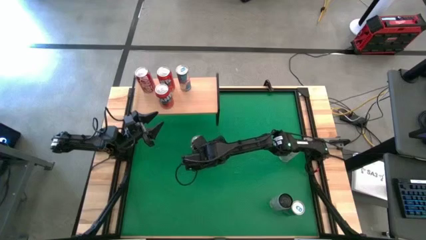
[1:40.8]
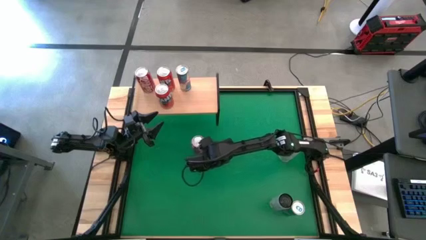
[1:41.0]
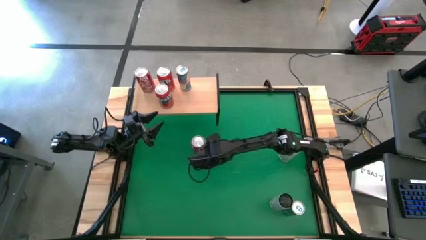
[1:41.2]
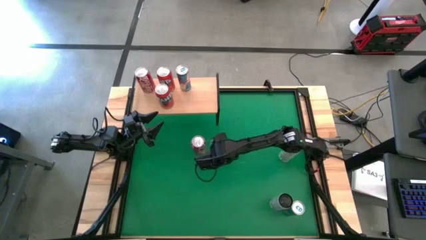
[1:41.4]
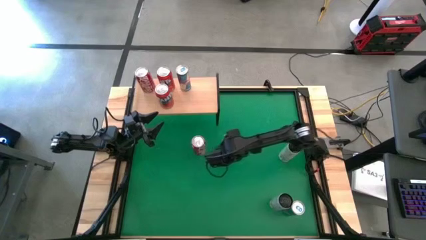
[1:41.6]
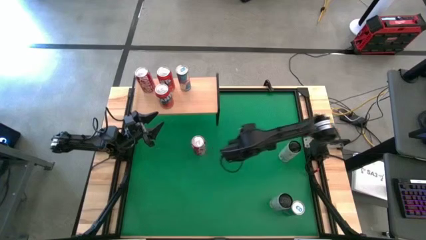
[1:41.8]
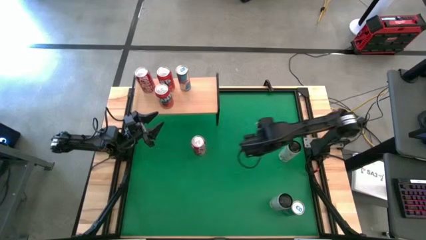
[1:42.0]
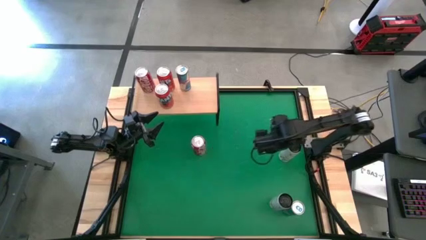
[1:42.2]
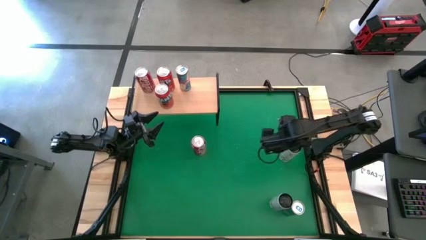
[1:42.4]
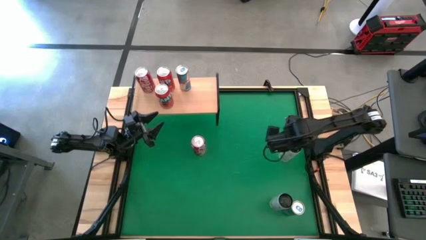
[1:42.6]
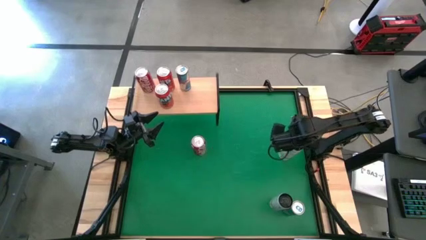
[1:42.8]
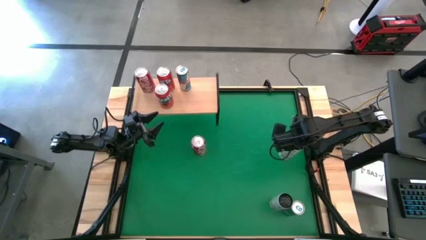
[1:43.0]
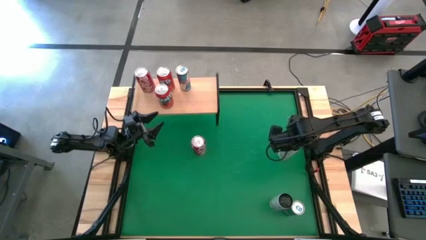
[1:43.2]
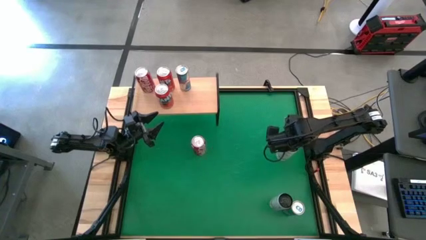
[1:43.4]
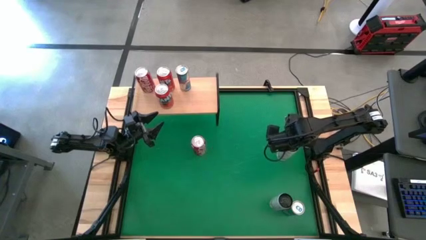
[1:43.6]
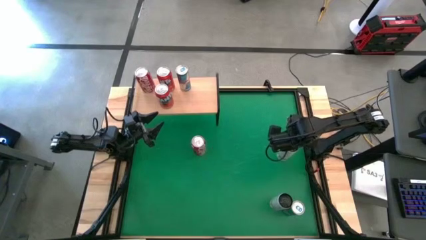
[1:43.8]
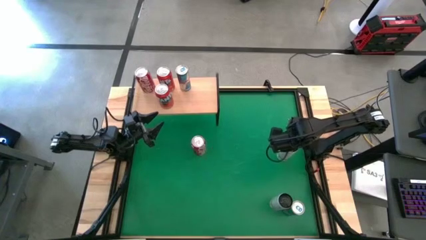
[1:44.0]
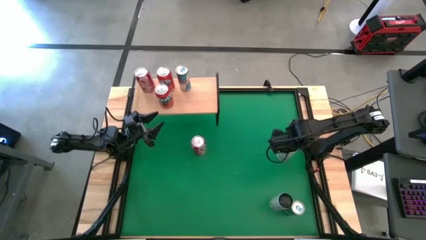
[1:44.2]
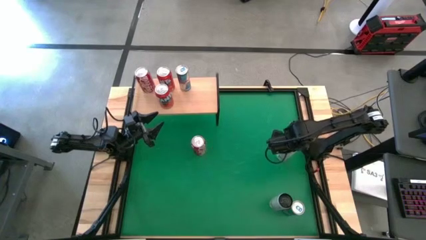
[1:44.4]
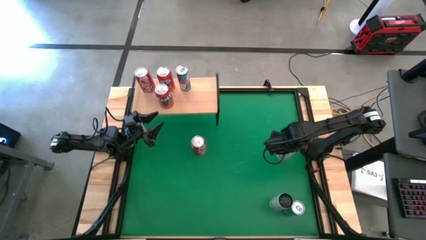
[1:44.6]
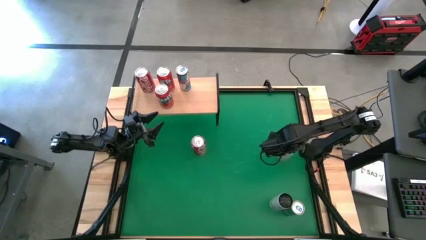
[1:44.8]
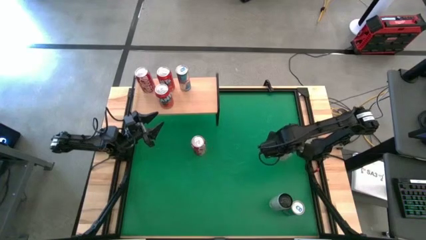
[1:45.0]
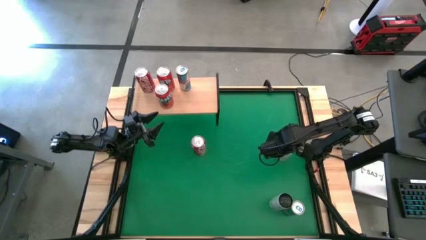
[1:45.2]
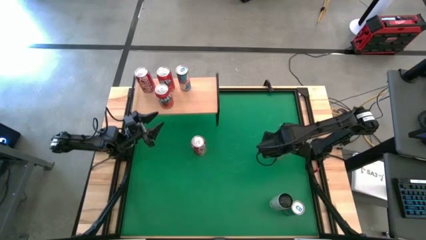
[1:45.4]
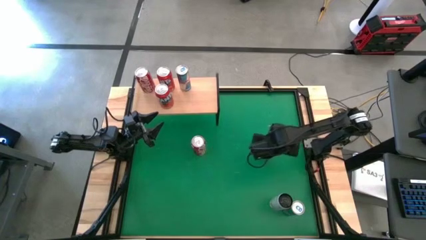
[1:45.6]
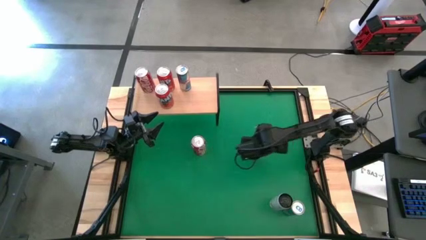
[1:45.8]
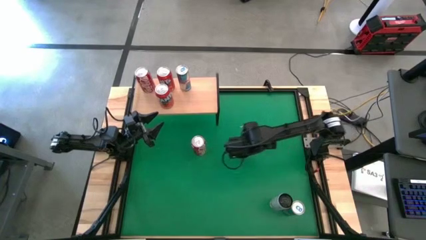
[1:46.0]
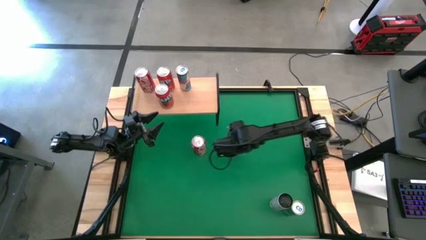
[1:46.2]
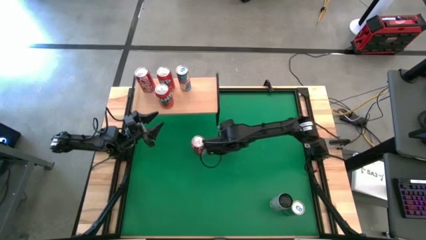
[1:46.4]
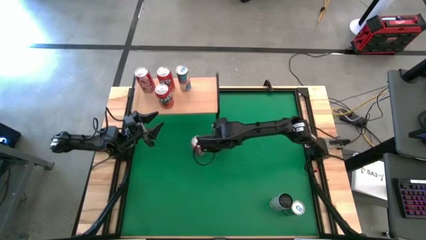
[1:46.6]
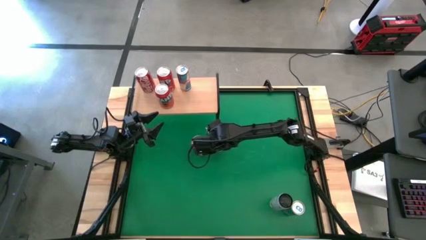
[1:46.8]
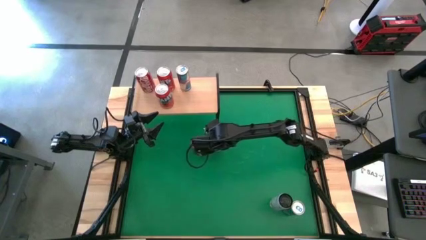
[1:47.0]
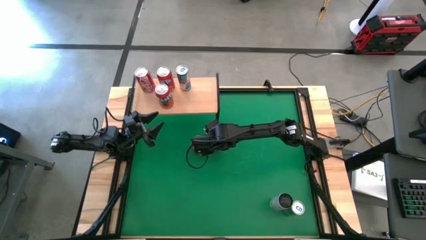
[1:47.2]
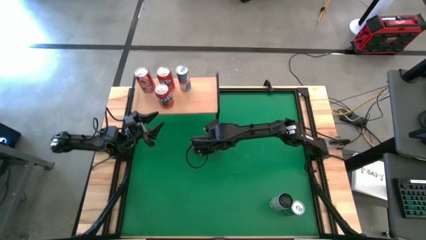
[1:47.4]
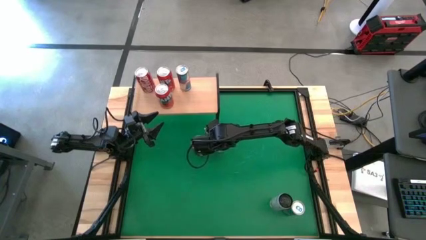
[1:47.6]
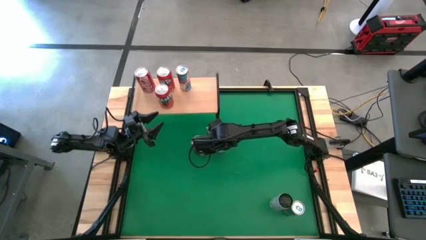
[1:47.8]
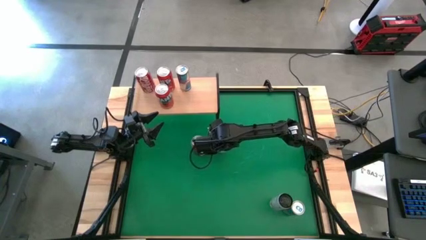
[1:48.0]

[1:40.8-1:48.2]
Task: Place canned beverage on shelf
Move the top white soda can to the center of the table

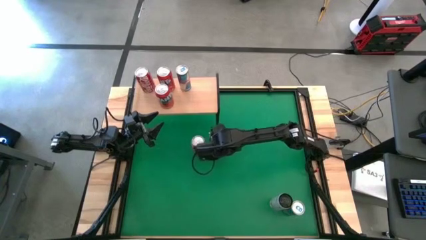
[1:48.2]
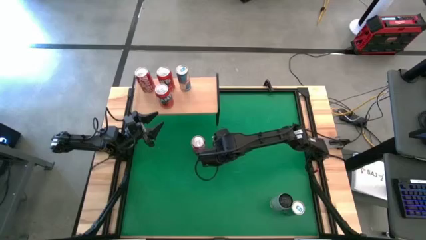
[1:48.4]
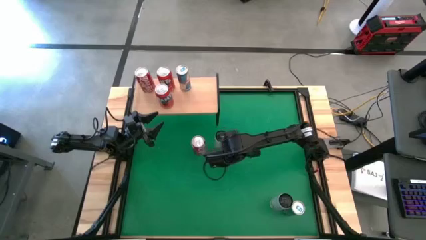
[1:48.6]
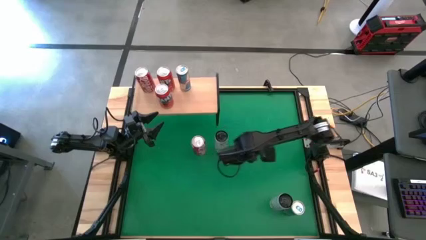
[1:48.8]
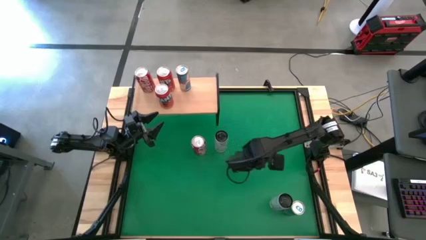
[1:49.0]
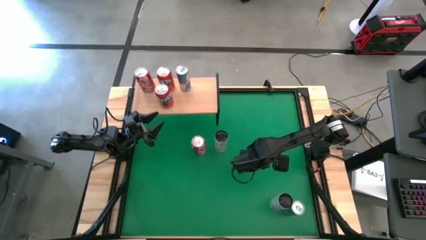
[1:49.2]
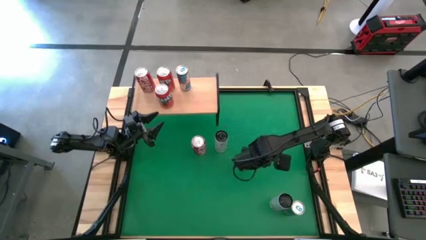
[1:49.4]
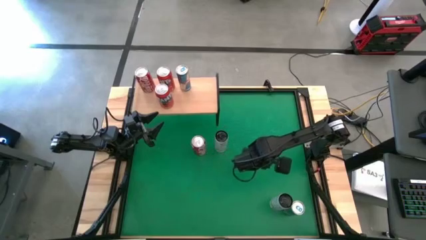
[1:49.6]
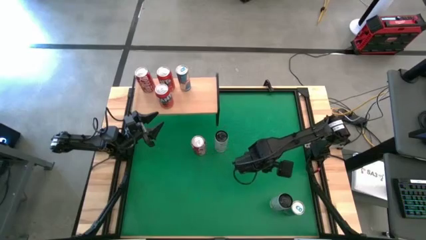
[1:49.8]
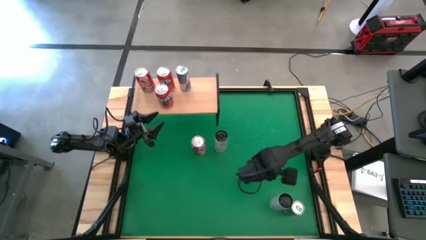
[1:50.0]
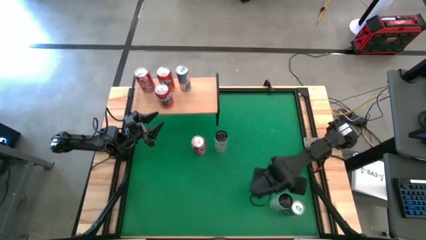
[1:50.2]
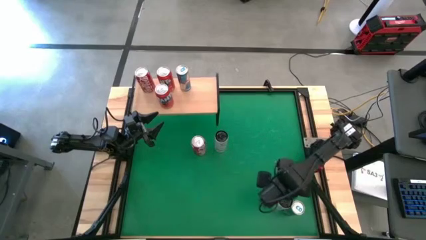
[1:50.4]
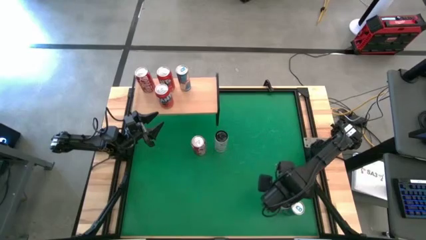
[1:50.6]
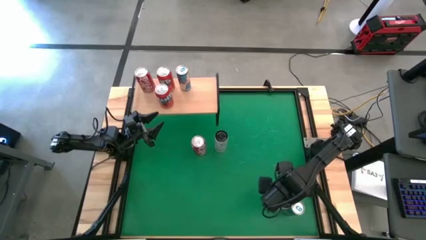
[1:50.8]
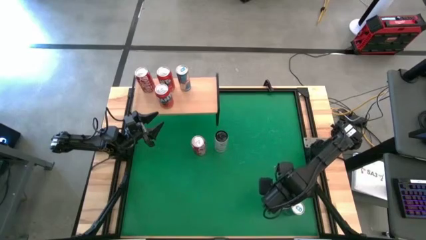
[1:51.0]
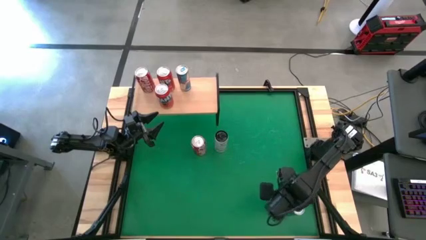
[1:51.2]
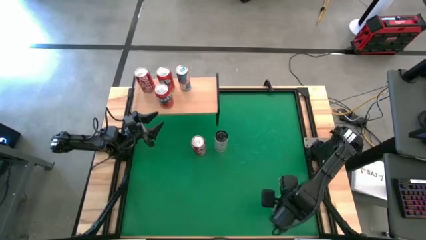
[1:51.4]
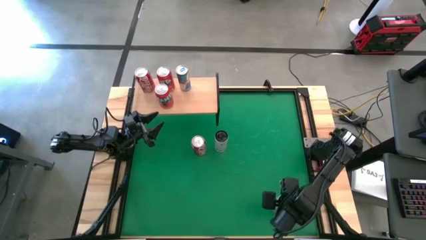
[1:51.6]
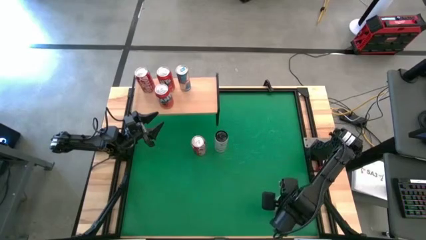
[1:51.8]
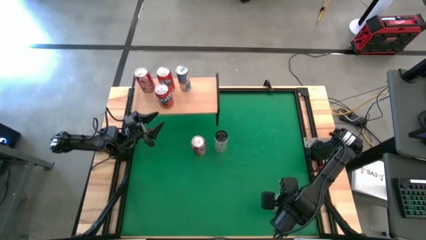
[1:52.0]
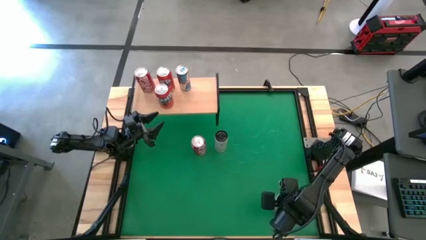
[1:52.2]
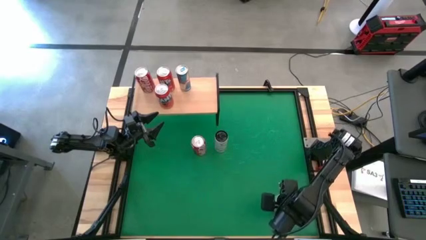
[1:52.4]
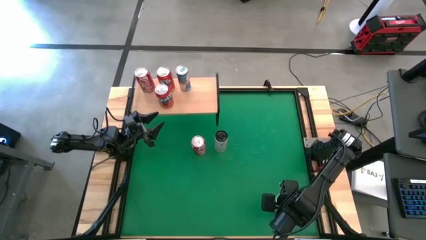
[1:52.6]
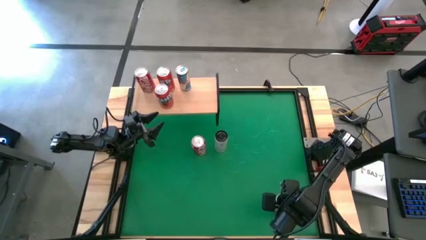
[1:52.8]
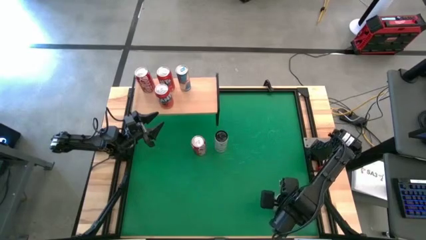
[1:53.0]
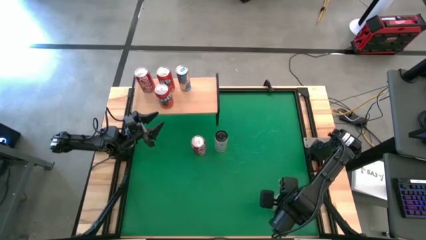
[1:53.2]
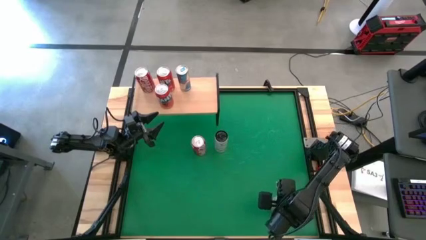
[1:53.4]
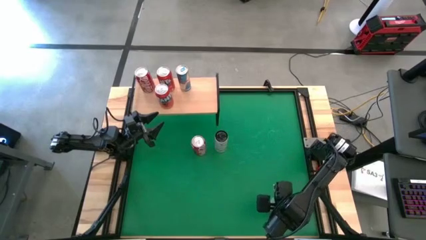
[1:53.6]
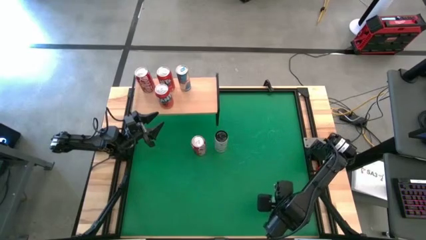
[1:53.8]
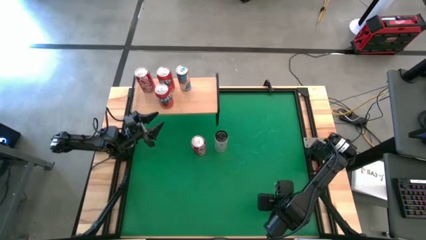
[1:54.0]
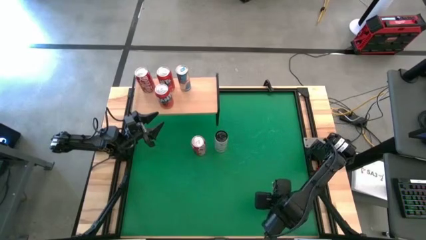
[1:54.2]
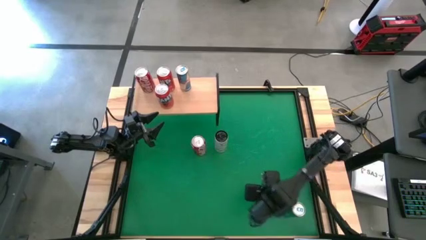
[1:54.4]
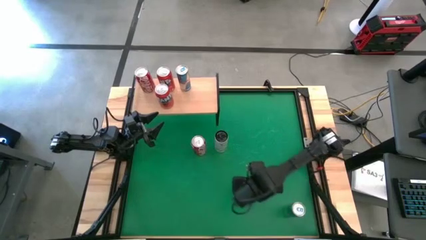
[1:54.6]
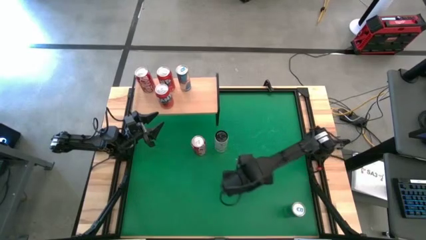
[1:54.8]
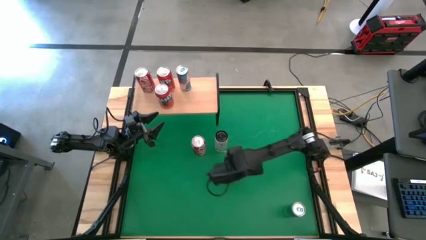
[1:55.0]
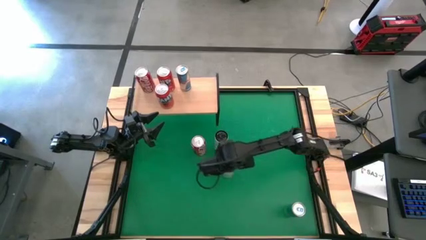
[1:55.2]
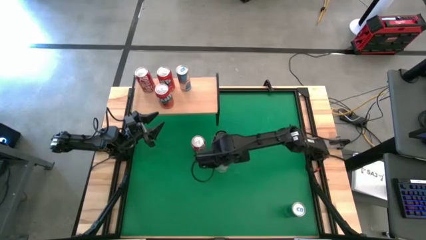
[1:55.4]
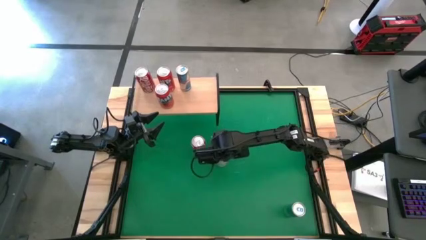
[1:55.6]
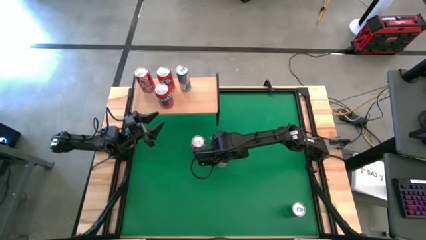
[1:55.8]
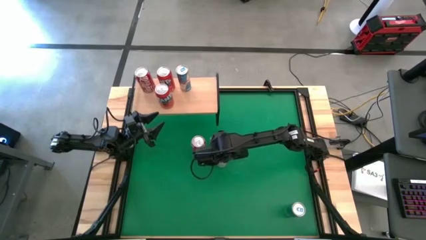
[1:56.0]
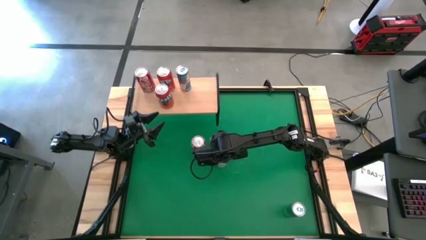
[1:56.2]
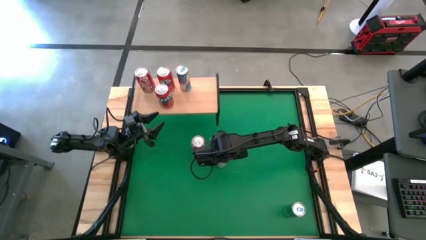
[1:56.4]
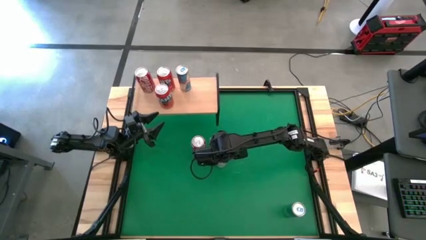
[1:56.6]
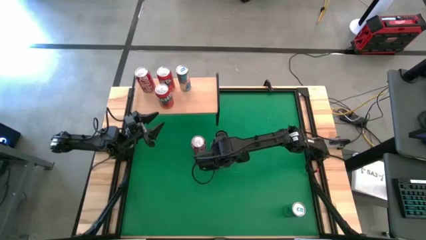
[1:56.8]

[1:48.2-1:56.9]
Move the bottom white soda can to the center of the table
